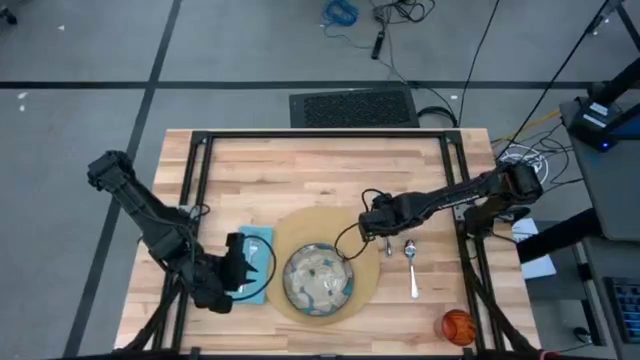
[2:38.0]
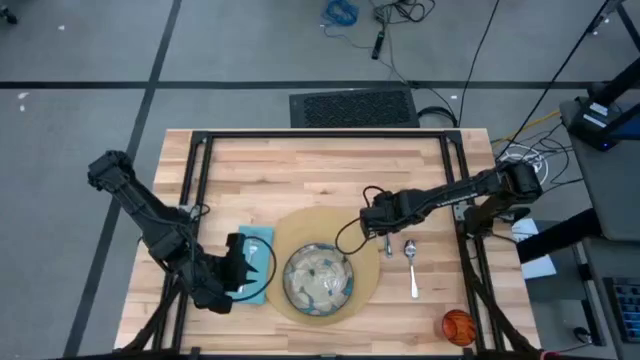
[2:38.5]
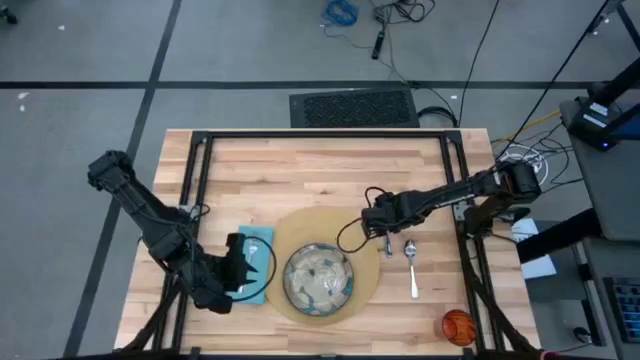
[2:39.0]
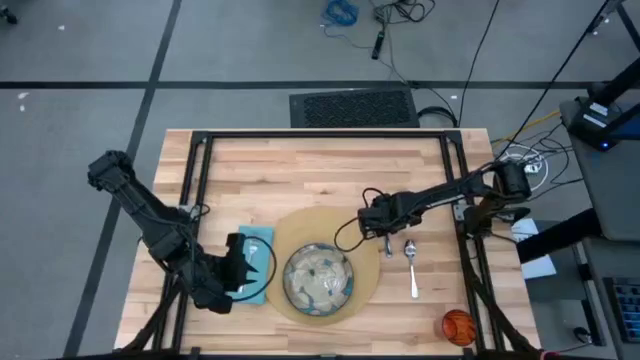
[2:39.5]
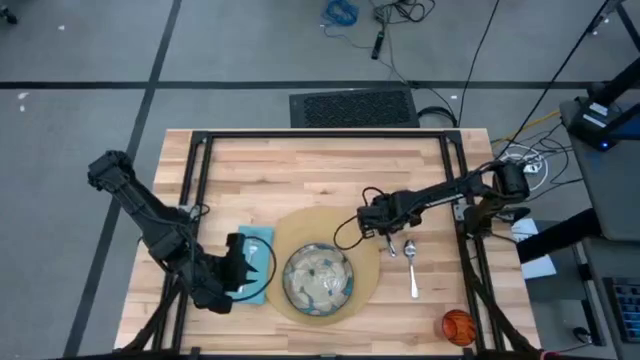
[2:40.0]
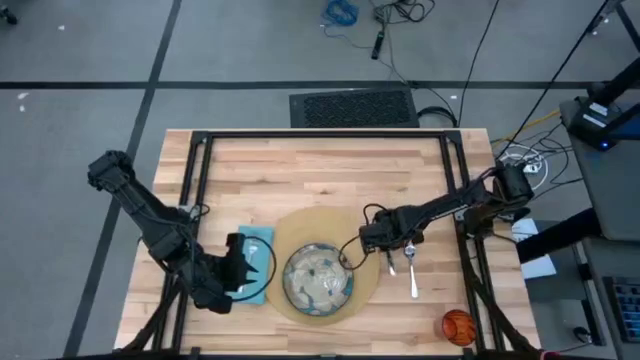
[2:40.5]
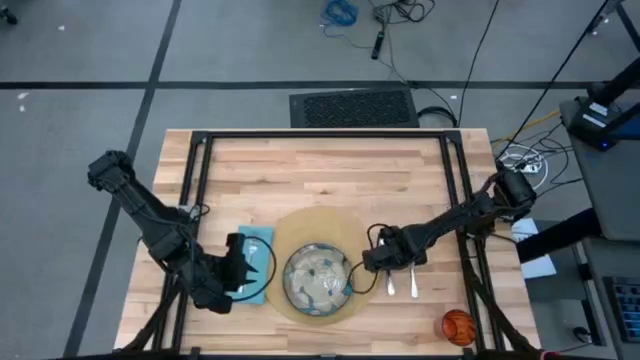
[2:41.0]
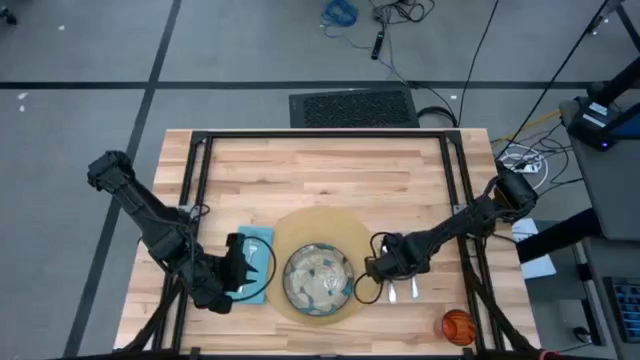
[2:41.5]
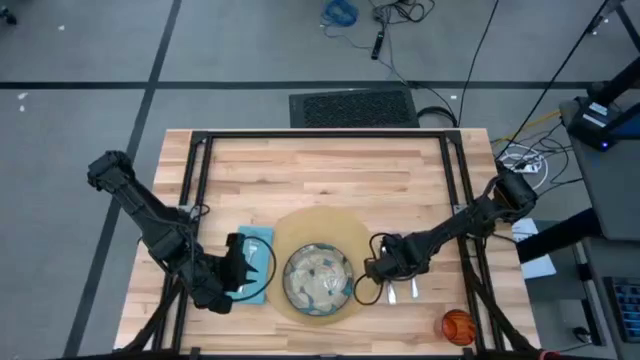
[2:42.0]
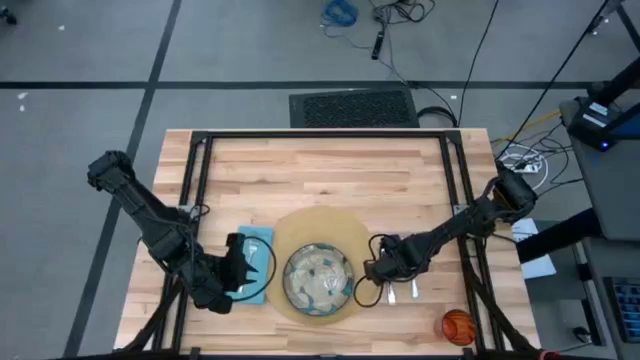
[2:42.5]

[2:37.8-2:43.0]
Task: Set table place
Move the silver knife to the right side of the brown mat

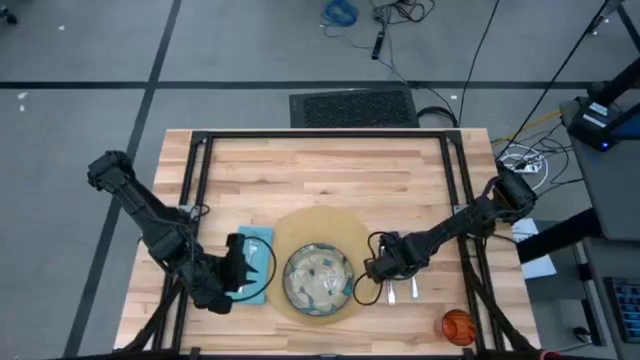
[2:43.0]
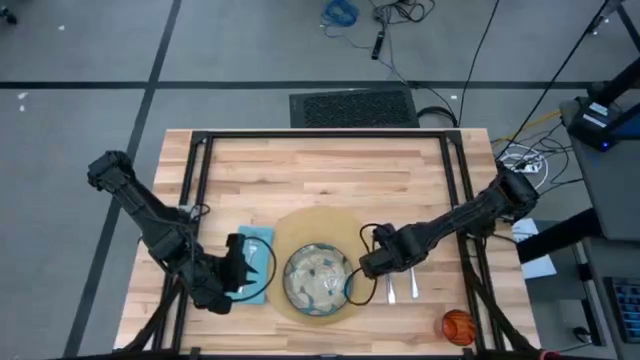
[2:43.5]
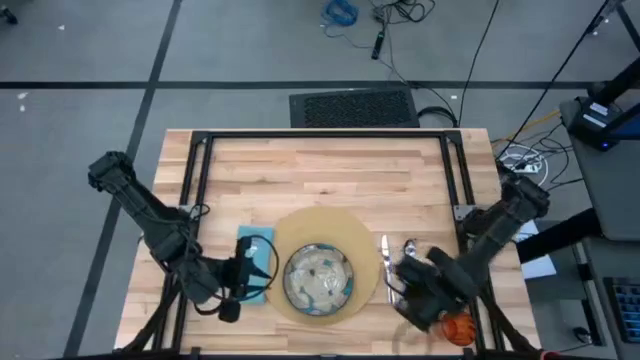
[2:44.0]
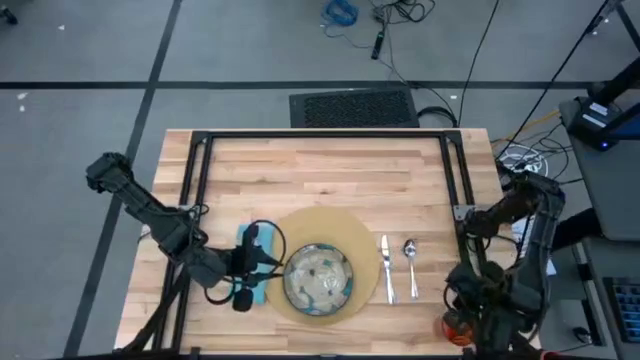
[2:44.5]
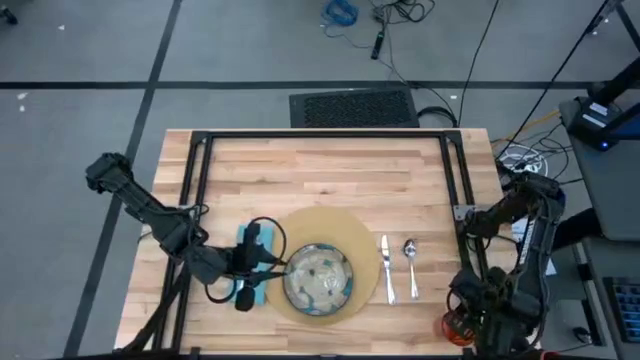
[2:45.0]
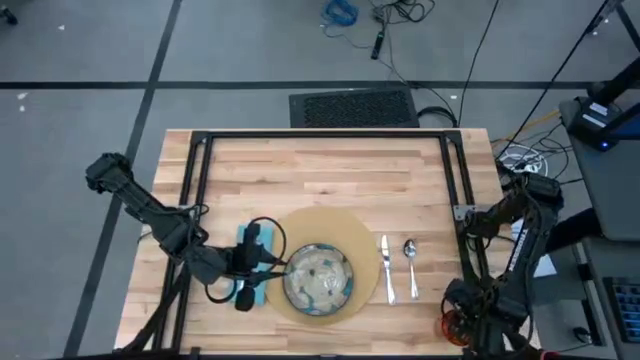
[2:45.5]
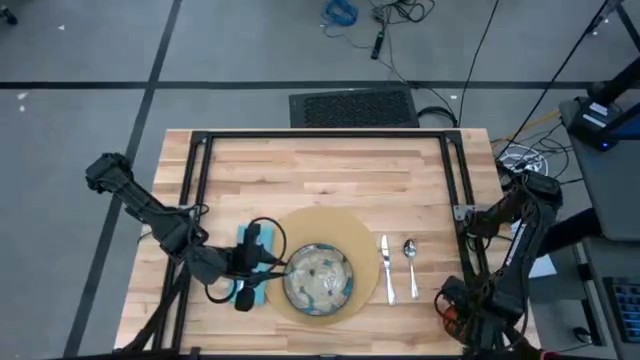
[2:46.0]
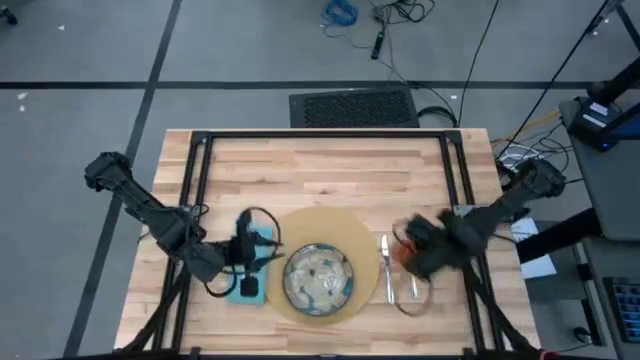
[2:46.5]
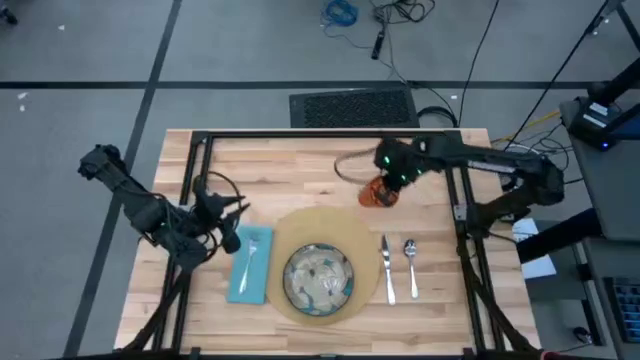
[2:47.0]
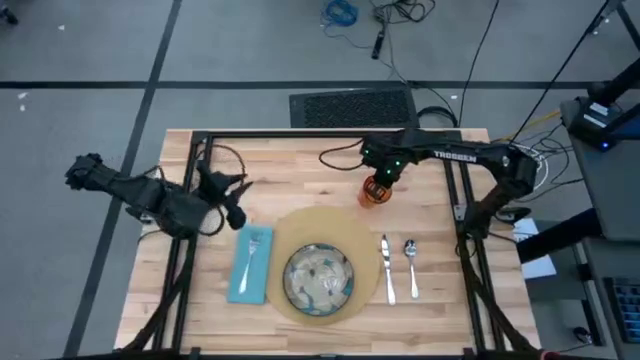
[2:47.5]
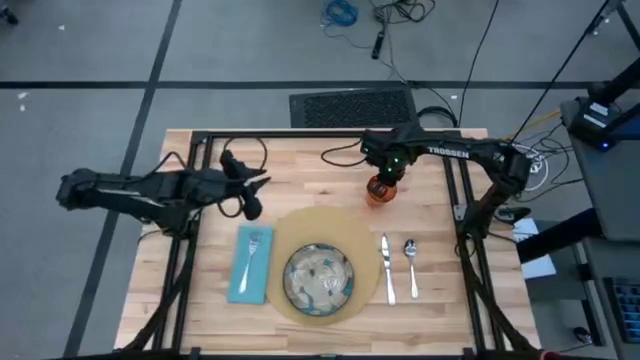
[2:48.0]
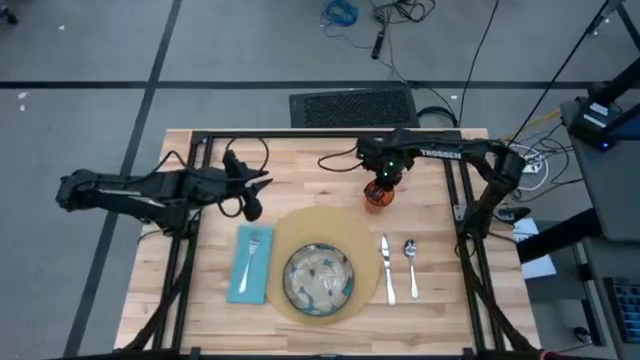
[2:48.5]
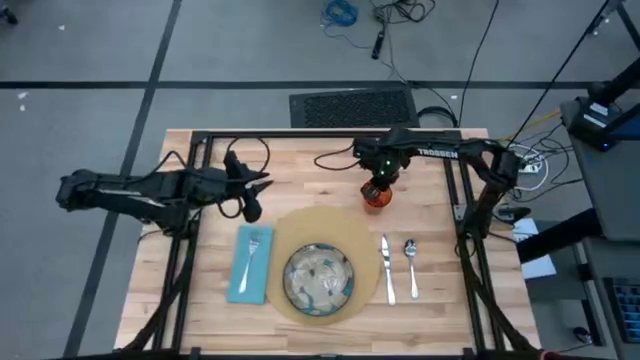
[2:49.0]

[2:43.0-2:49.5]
Put the orange cup on the top right of the brown mat

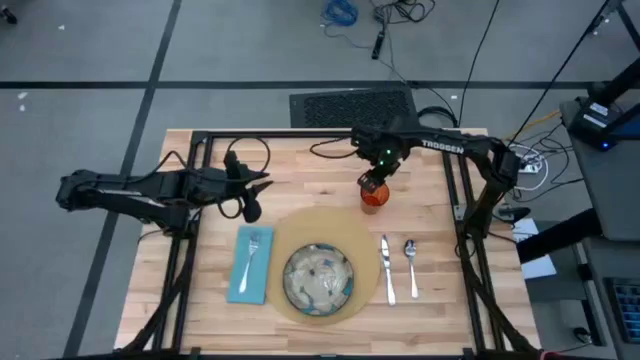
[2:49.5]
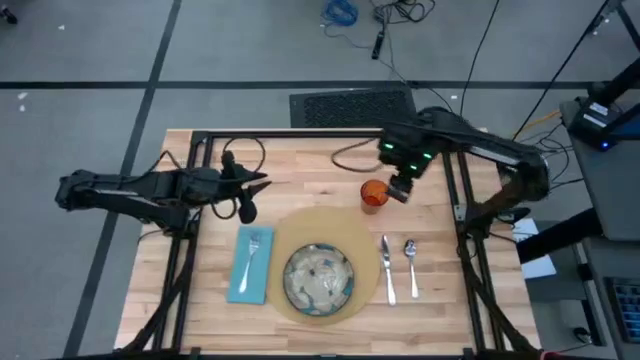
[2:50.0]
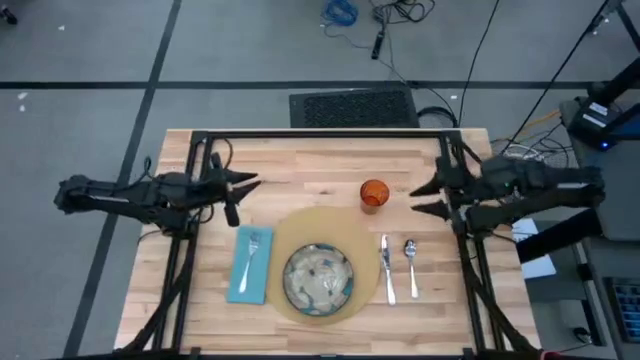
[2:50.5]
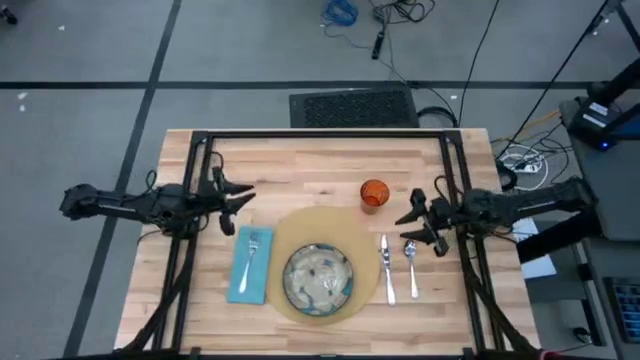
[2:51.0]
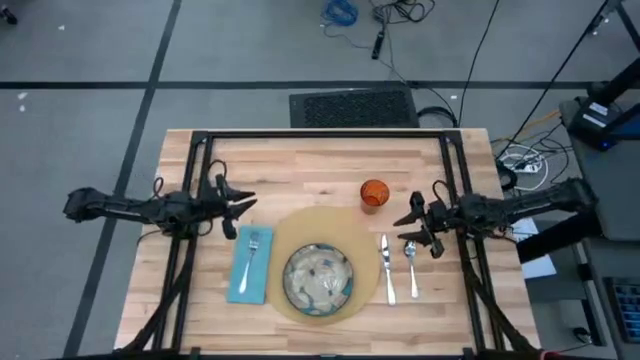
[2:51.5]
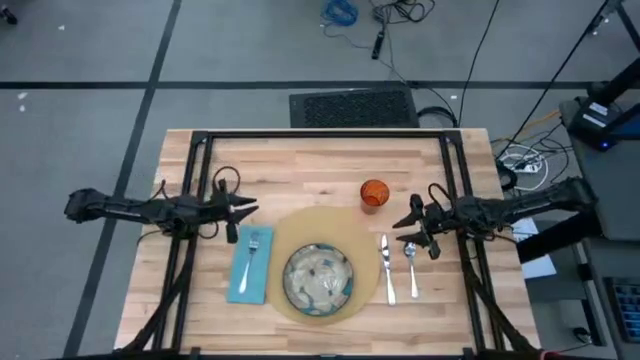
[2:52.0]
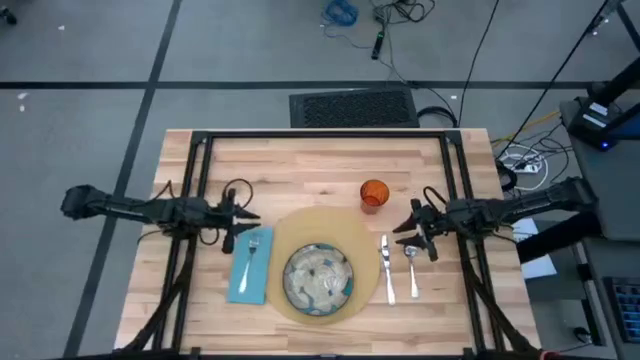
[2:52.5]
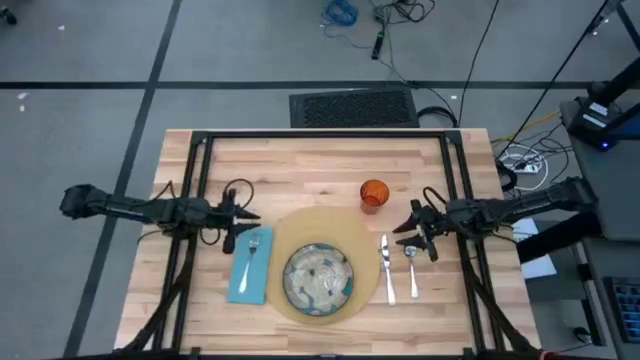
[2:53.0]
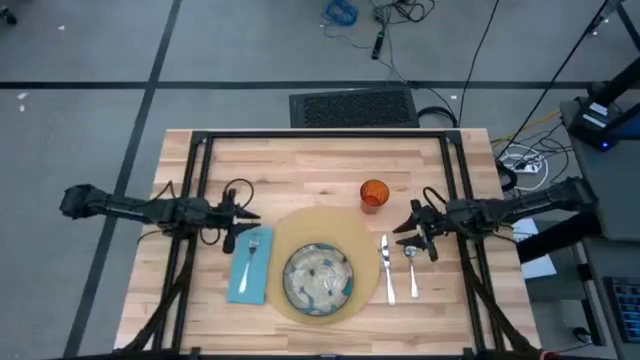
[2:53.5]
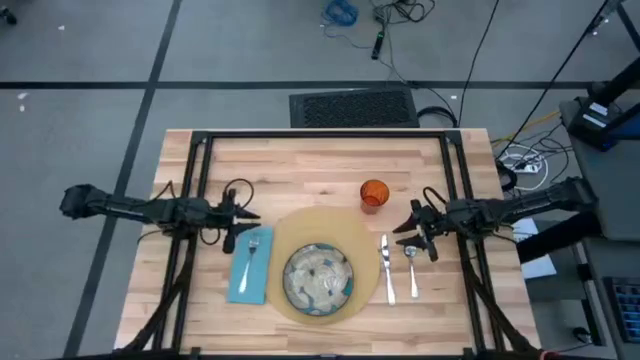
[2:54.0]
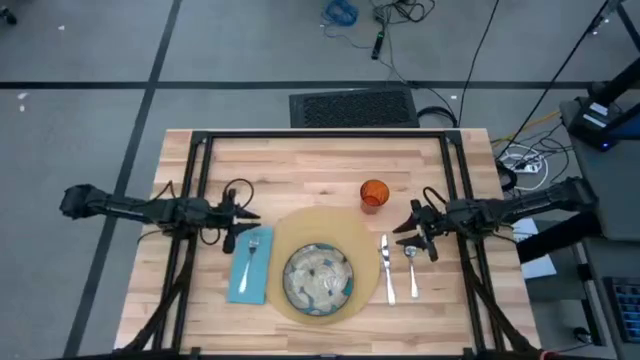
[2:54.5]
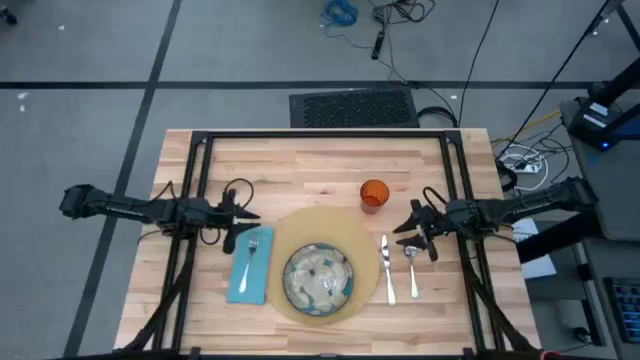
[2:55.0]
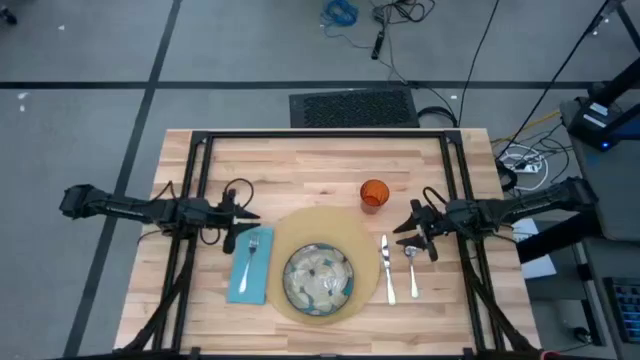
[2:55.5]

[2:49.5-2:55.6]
Return to Home Position

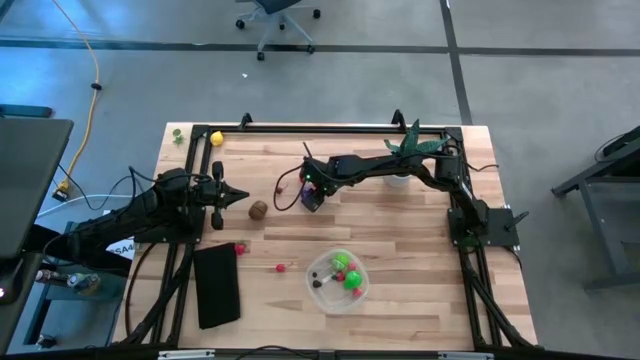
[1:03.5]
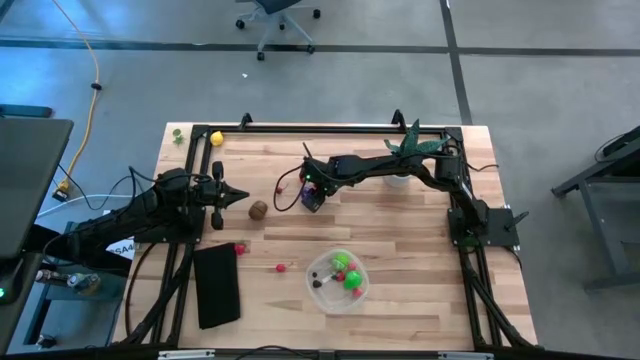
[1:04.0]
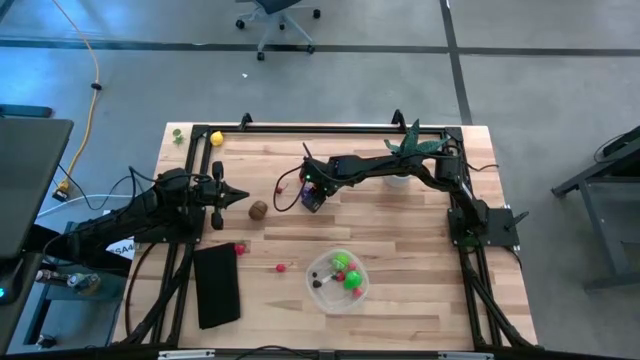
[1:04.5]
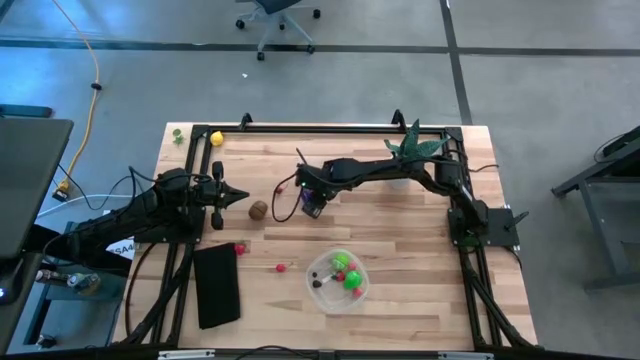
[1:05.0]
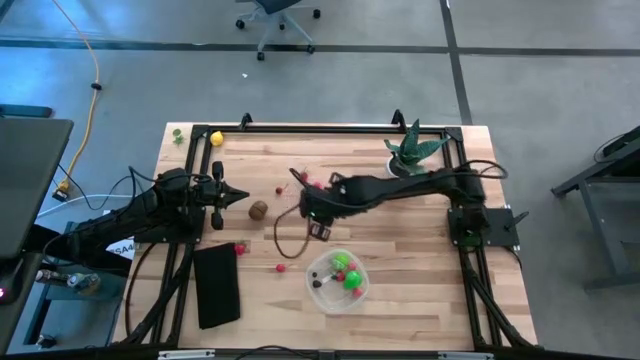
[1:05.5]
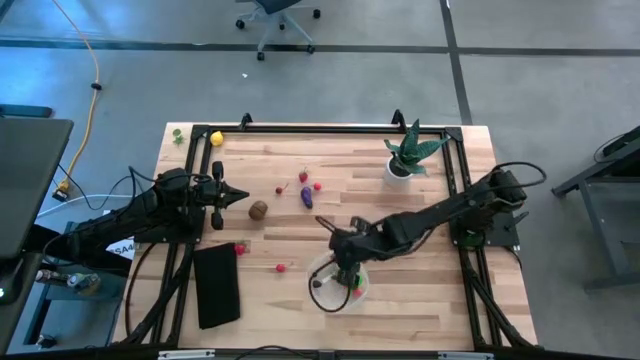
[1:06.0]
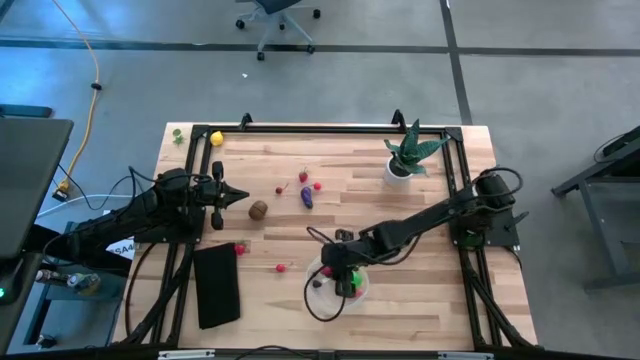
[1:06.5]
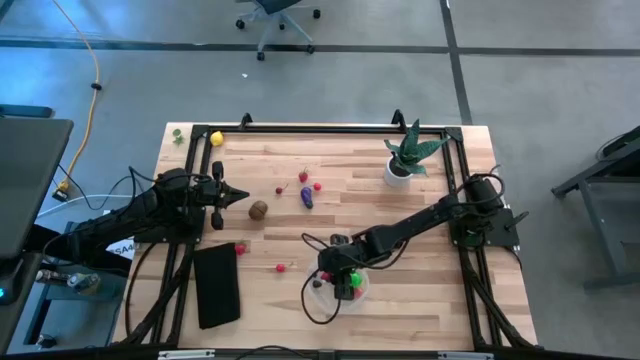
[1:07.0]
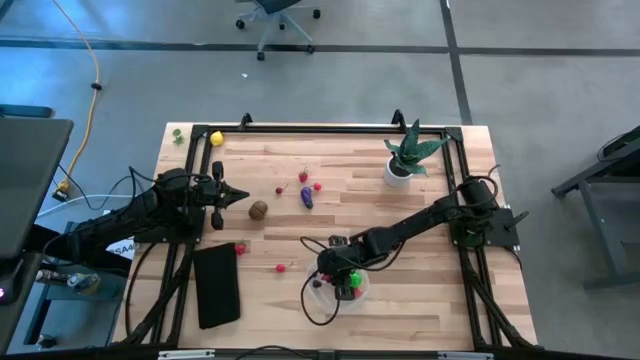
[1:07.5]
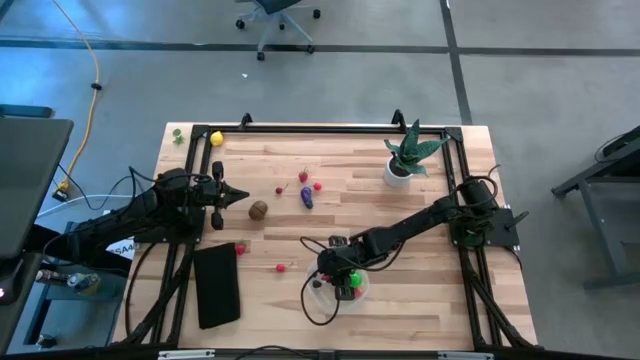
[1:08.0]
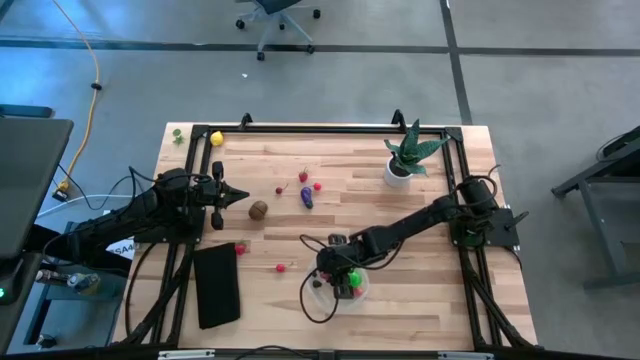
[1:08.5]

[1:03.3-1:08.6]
Task: Pick and placing Produce into tupperware
Put the red strawberry into the transparent container
